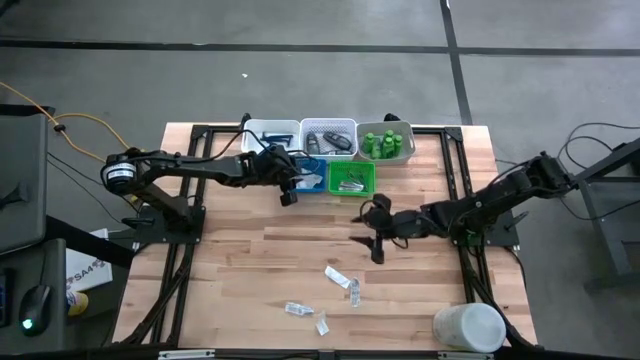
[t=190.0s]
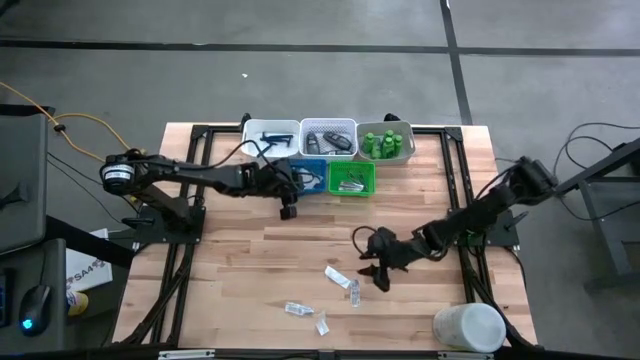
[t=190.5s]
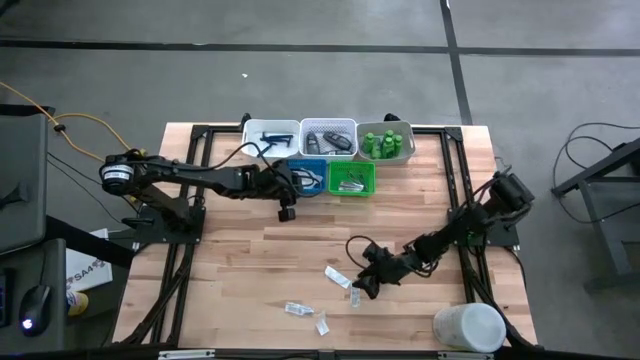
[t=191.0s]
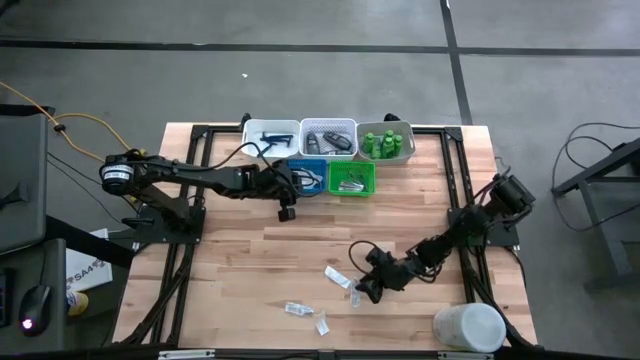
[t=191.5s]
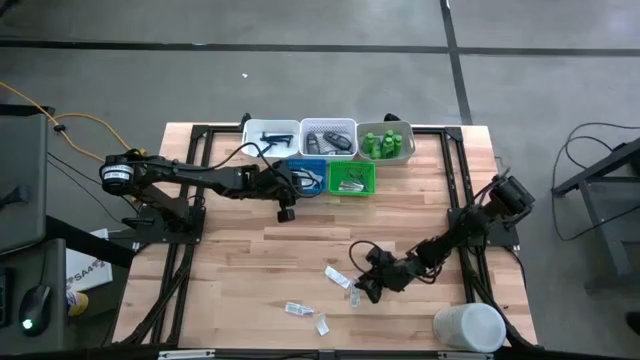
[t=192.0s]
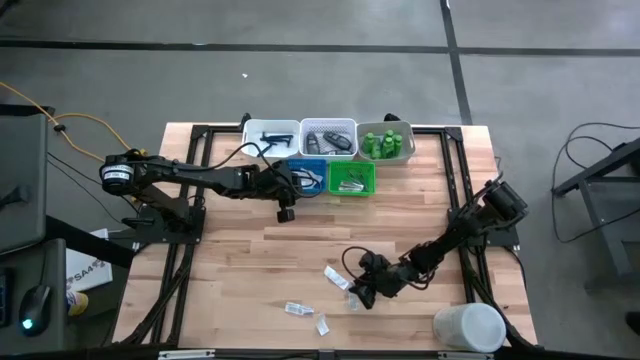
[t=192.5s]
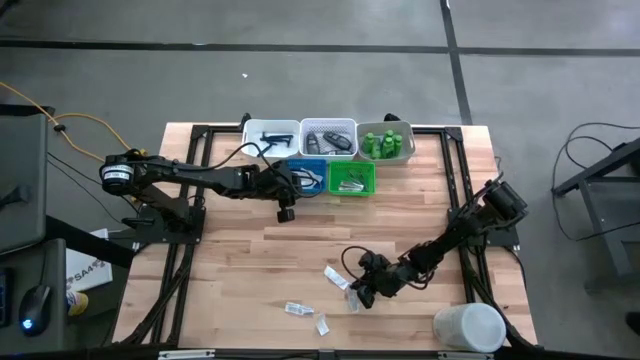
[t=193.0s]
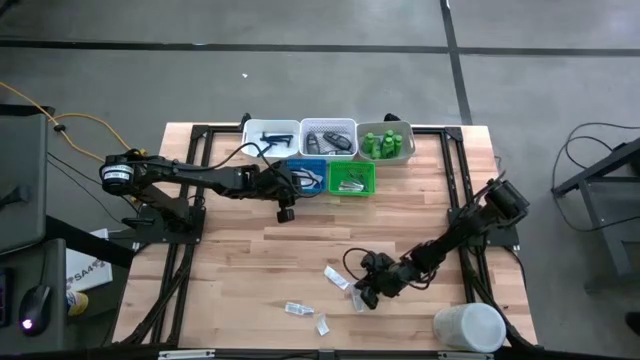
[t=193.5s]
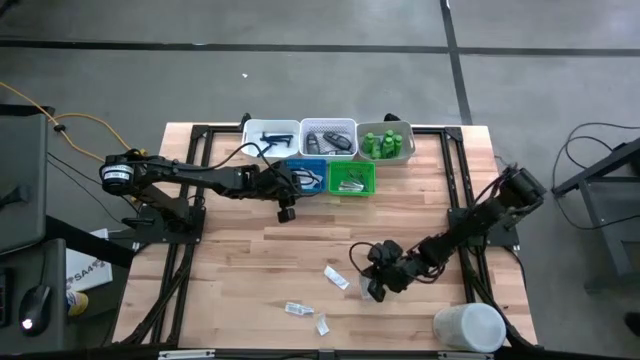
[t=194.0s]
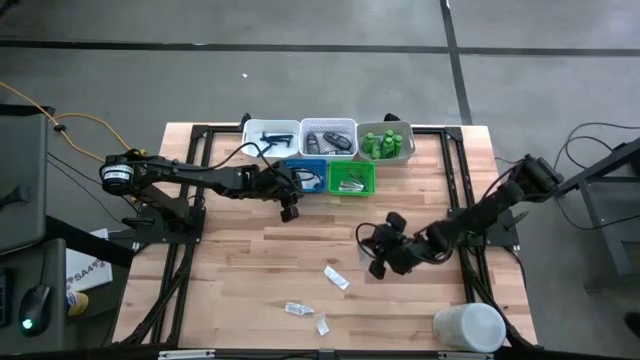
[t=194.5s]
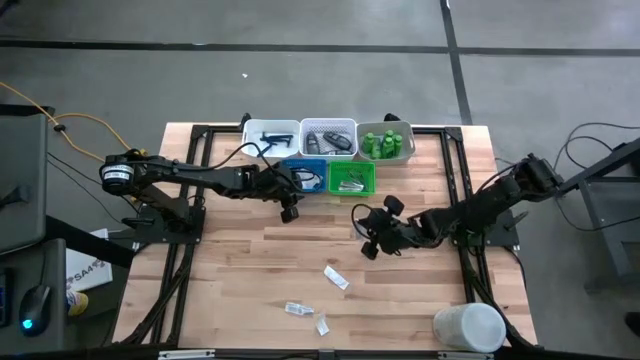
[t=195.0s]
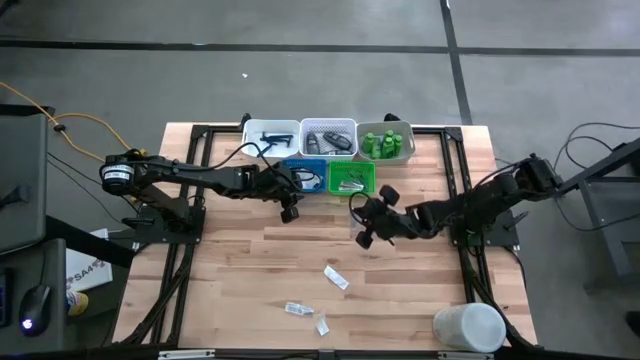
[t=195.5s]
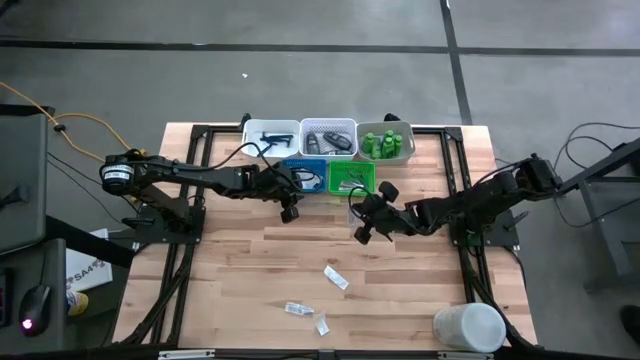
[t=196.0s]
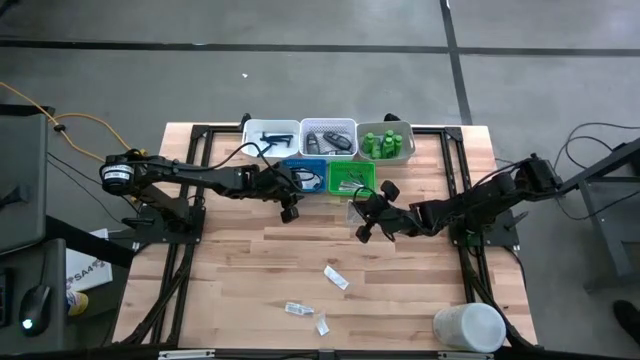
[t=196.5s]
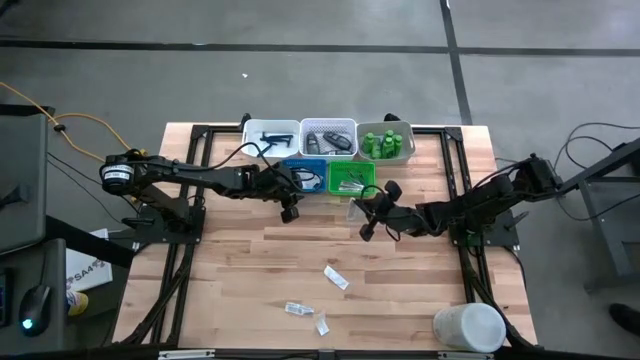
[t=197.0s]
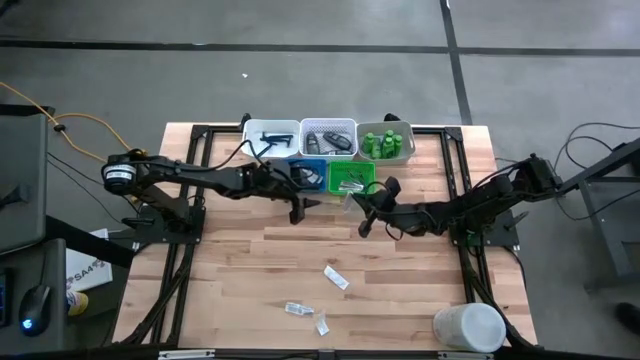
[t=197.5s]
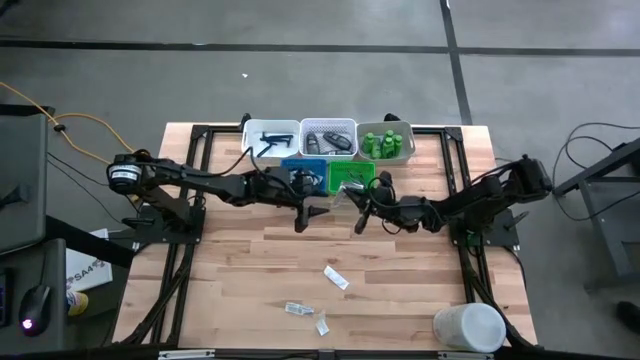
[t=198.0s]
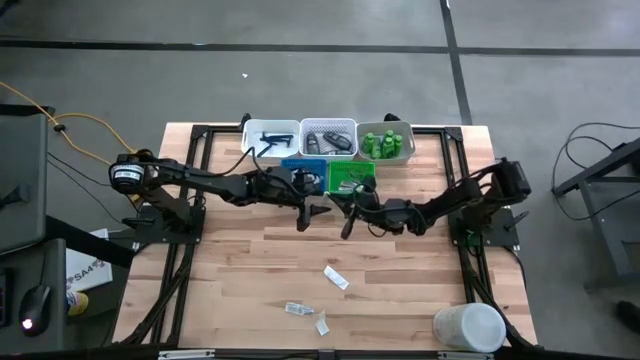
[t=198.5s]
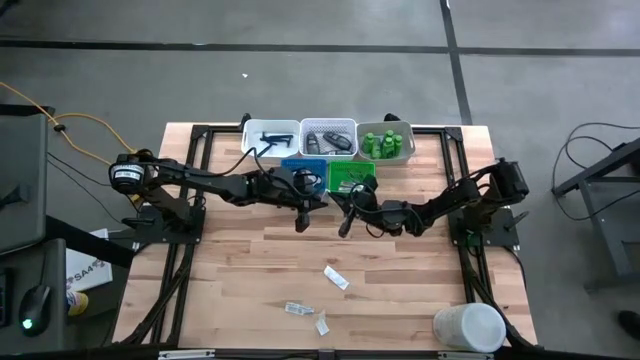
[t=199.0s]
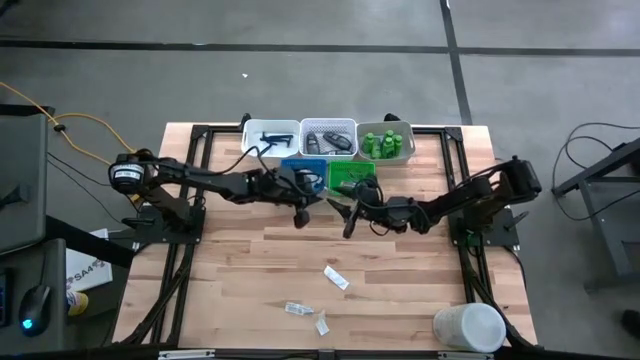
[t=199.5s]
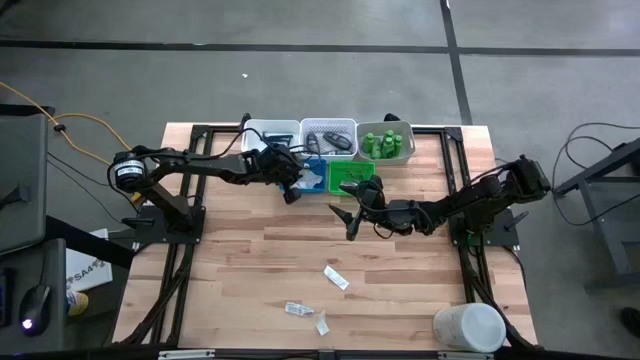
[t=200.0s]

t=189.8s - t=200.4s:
Task: Pick & Place Travel size toiletries
Put the white bandage pad into the blue basket

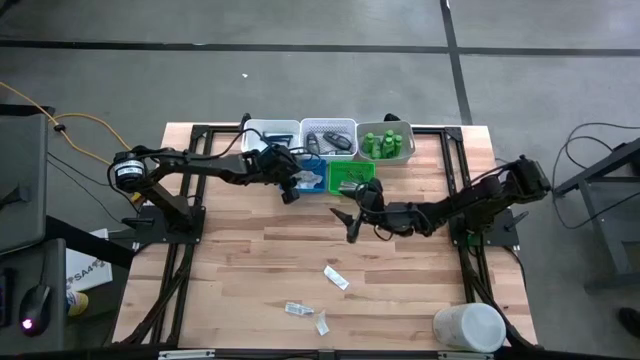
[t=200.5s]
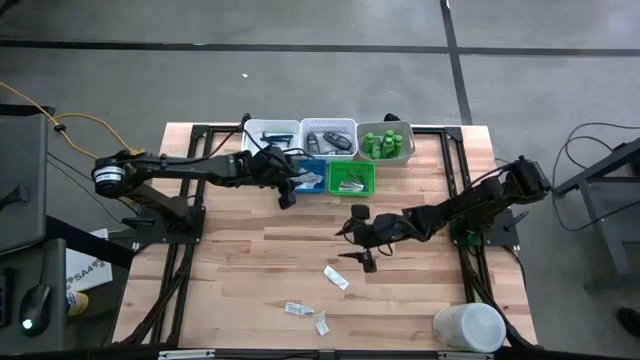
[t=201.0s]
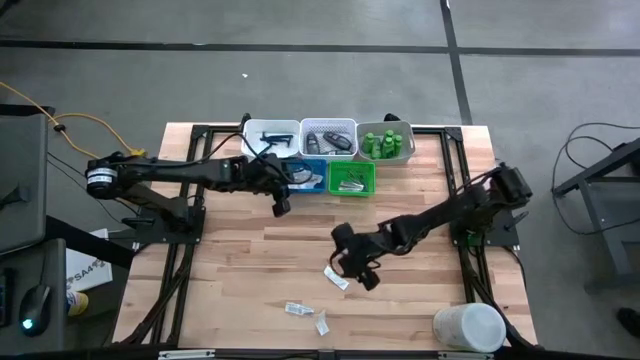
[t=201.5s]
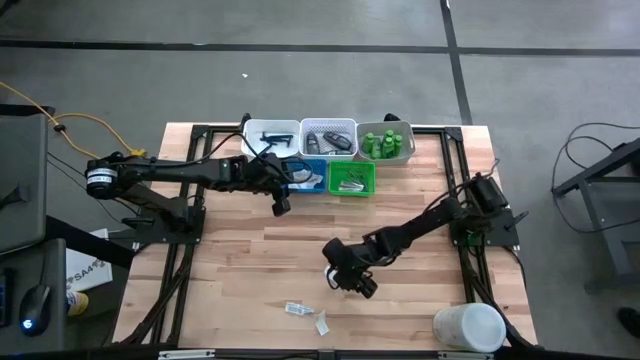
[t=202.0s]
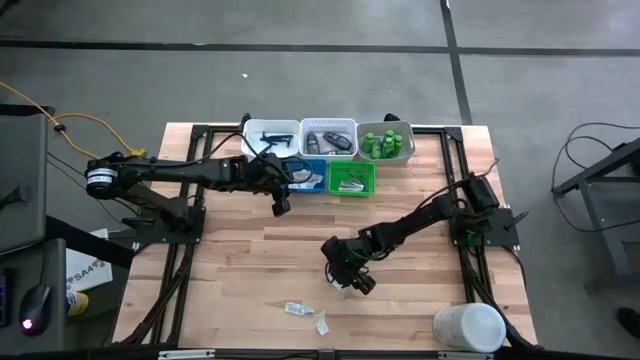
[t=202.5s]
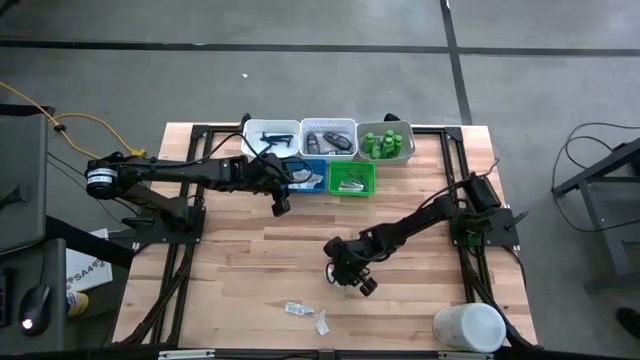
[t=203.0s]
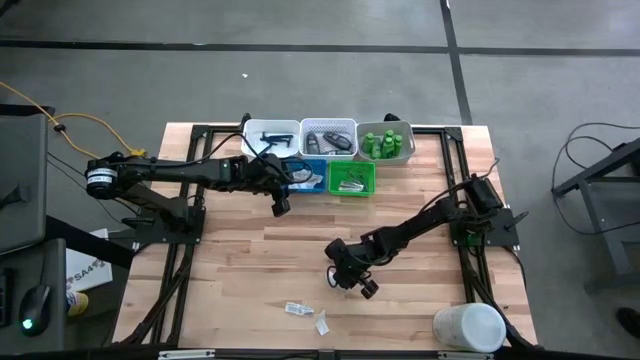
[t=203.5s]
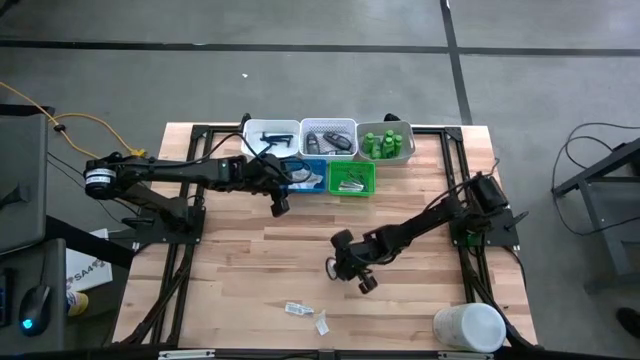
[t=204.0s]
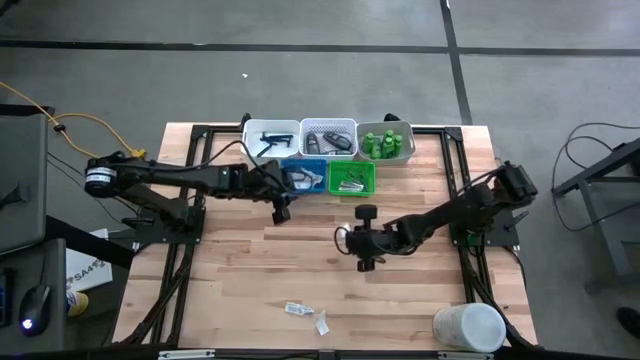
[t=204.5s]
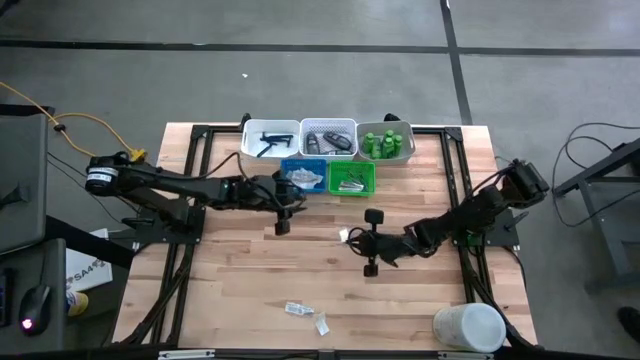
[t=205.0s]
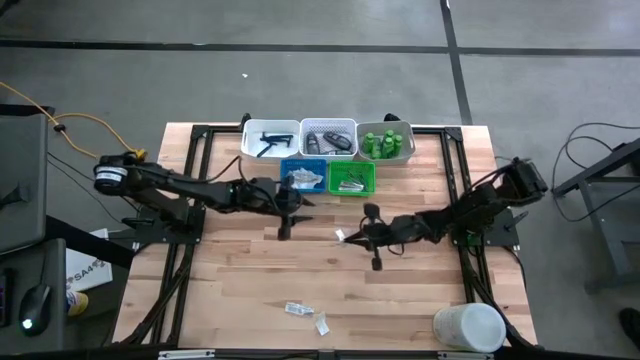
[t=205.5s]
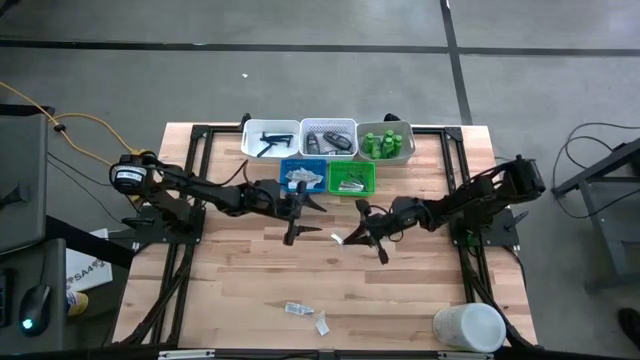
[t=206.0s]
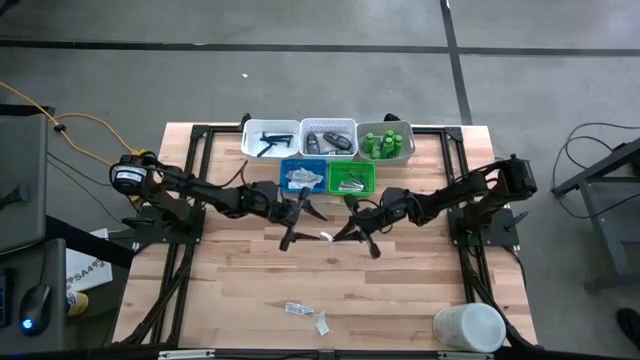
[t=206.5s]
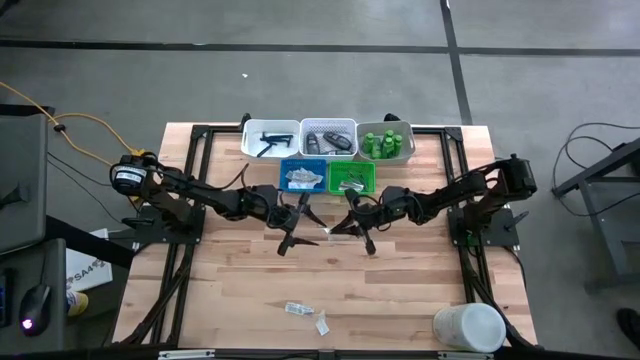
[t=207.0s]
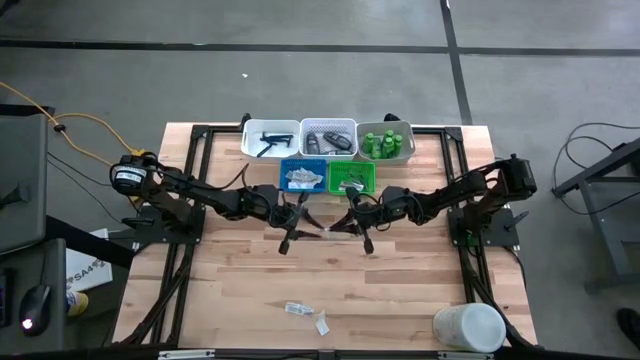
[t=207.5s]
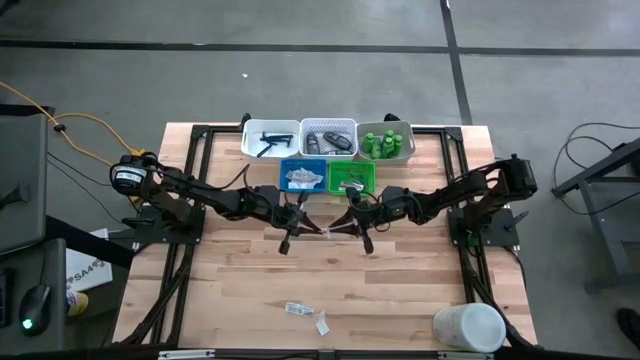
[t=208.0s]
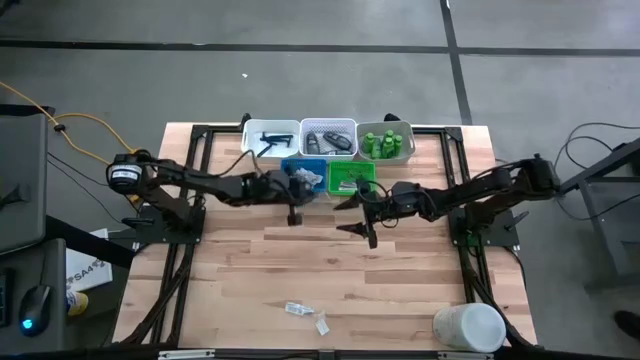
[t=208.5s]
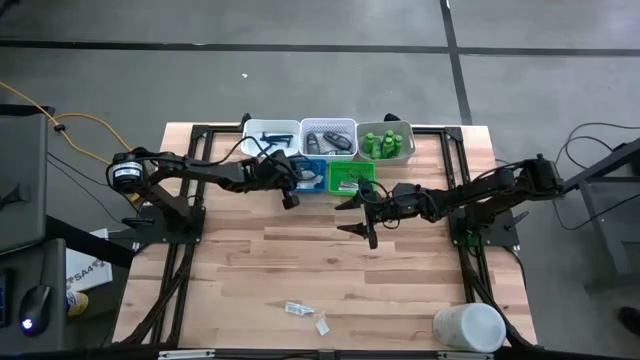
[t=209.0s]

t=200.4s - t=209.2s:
Put the white bandage pad into the blue basket

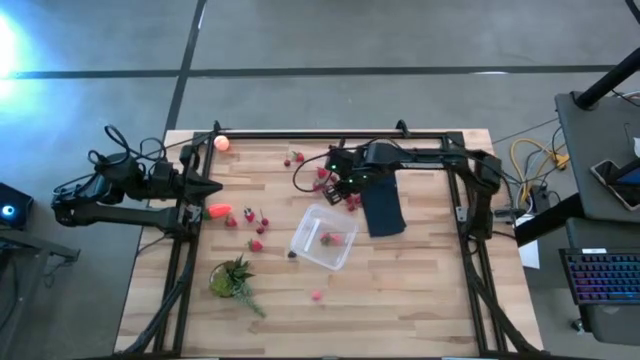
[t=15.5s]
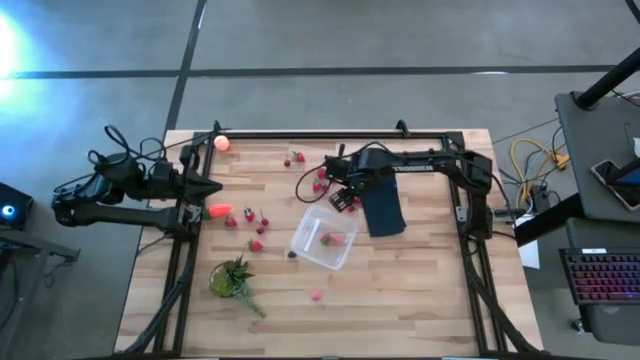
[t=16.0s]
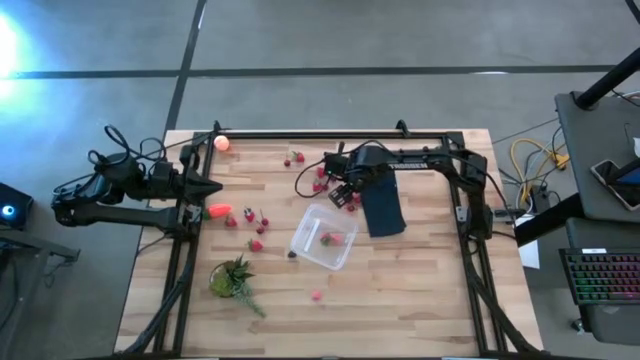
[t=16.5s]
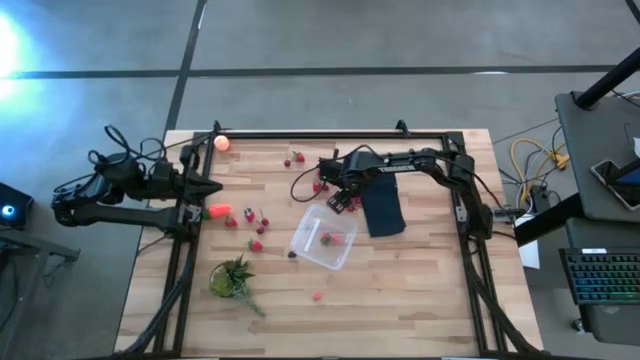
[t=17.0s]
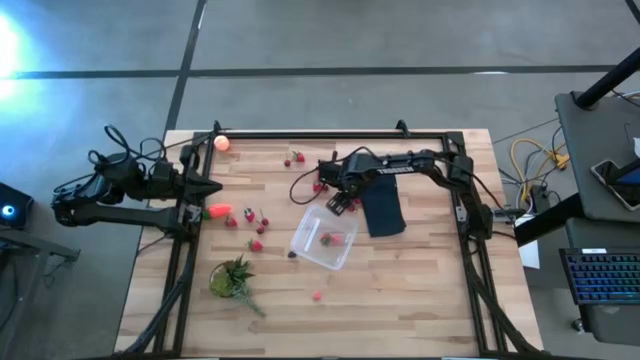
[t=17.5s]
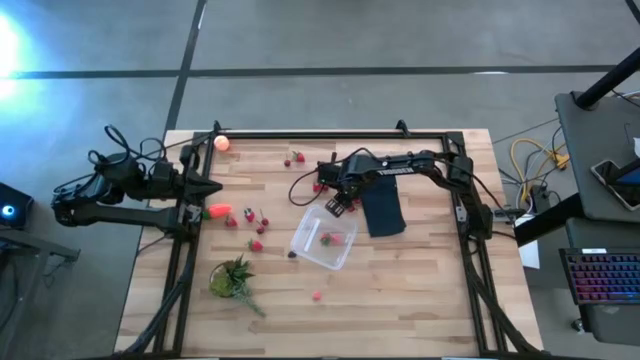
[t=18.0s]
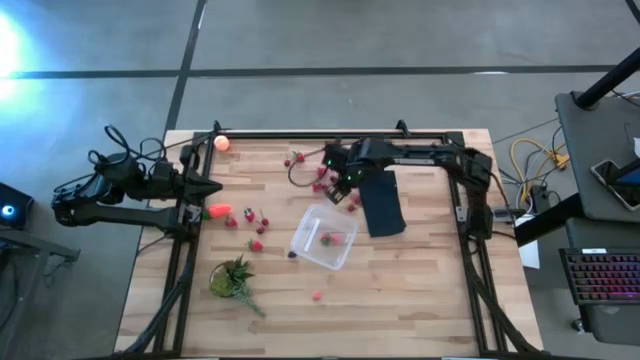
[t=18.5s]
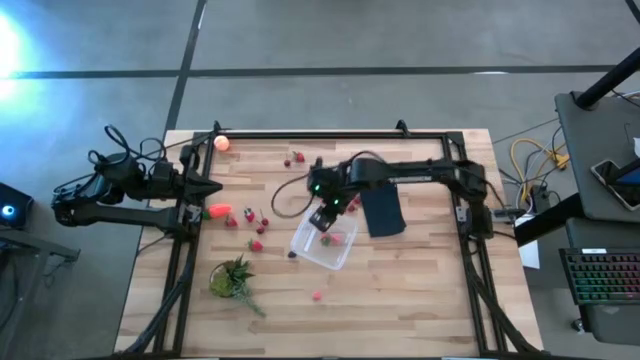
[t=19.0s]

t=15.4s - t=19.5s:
Task: Pick and placing Produce into tupperware
Put the red cherry into the transparent bin
